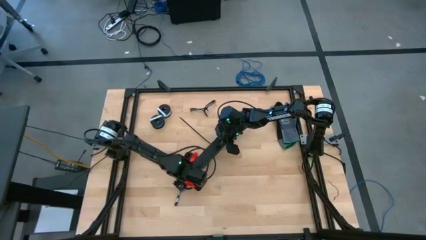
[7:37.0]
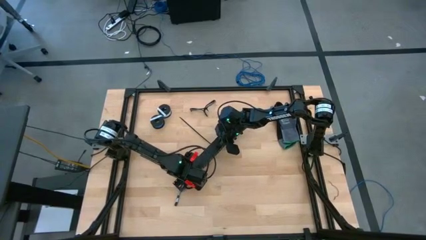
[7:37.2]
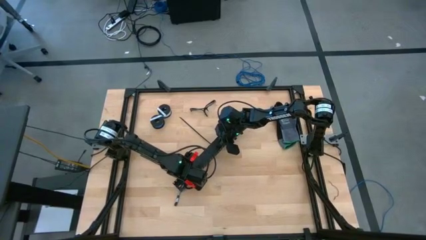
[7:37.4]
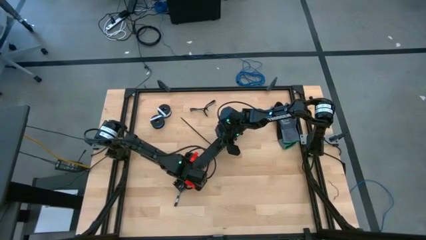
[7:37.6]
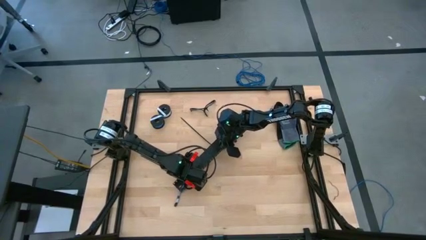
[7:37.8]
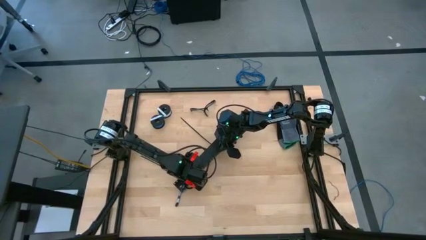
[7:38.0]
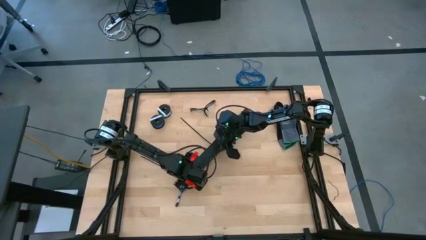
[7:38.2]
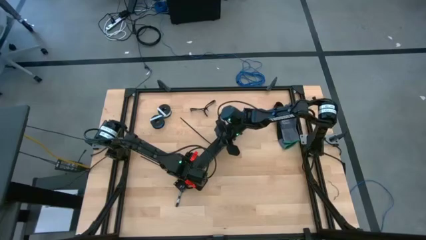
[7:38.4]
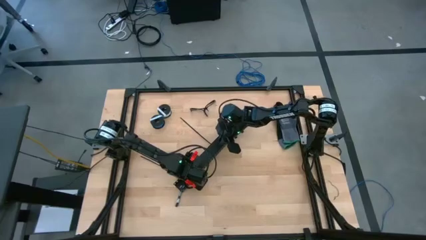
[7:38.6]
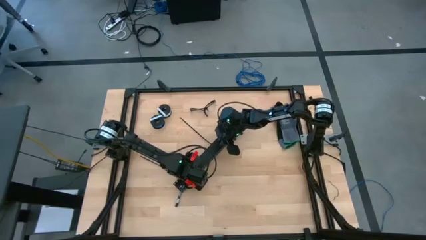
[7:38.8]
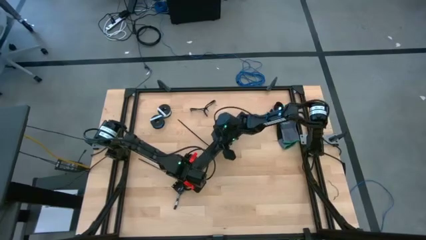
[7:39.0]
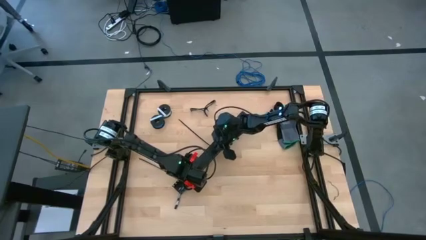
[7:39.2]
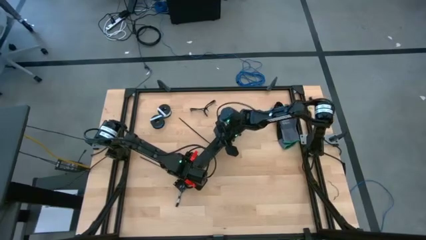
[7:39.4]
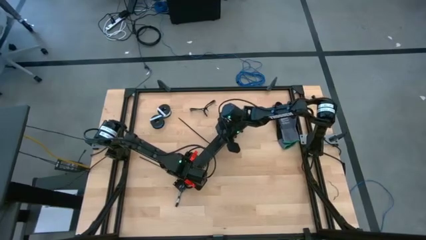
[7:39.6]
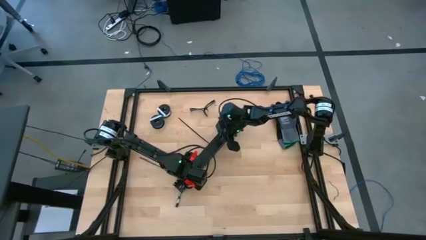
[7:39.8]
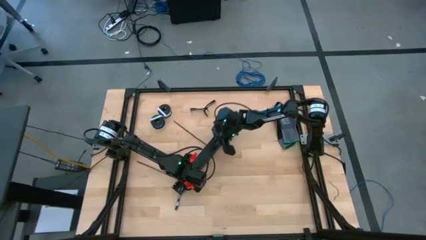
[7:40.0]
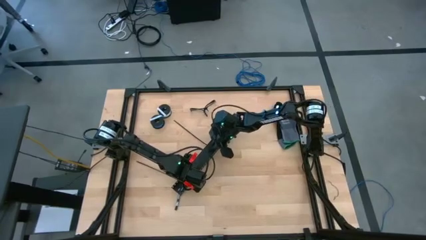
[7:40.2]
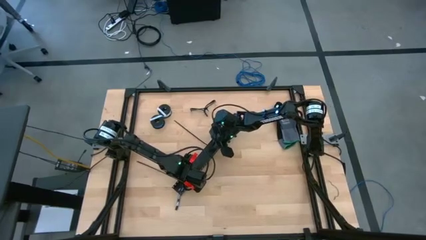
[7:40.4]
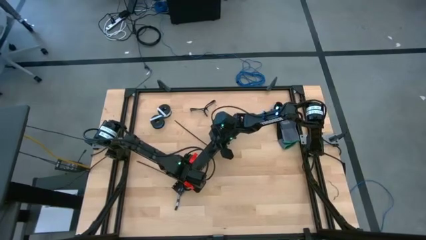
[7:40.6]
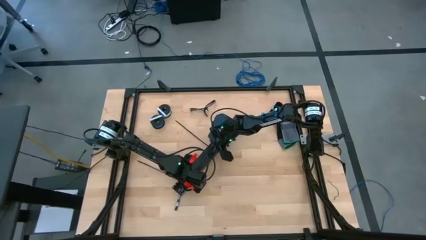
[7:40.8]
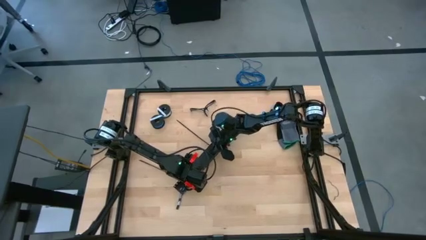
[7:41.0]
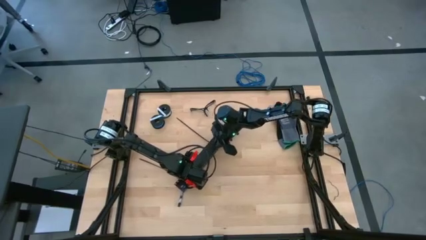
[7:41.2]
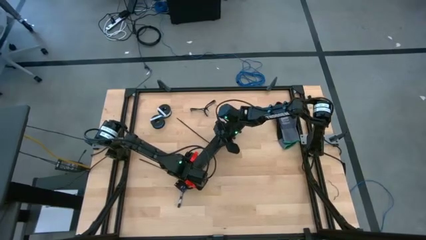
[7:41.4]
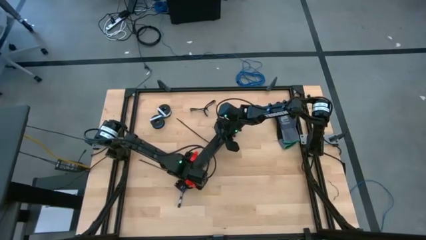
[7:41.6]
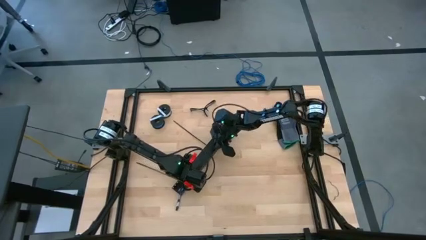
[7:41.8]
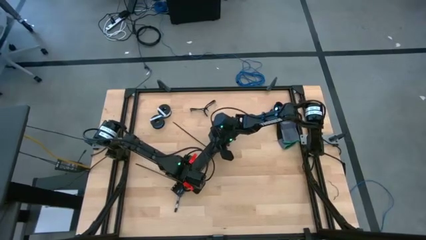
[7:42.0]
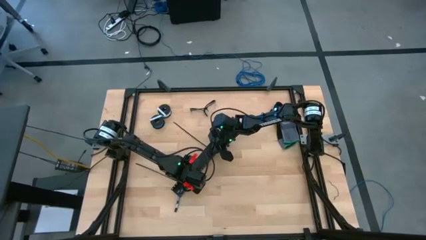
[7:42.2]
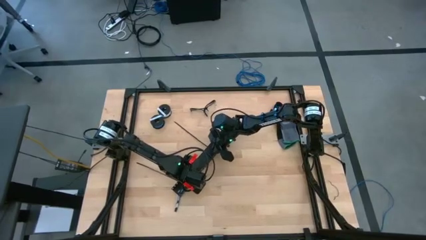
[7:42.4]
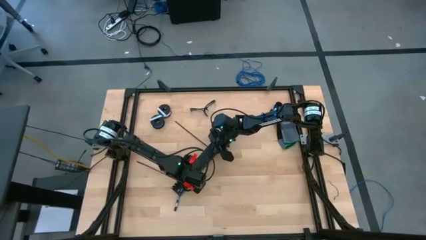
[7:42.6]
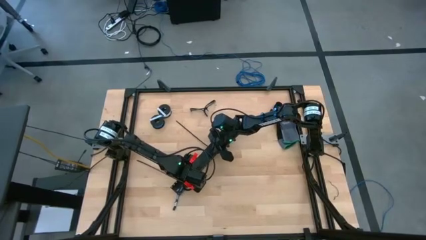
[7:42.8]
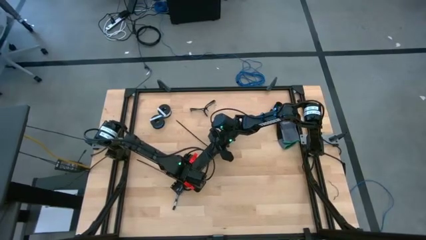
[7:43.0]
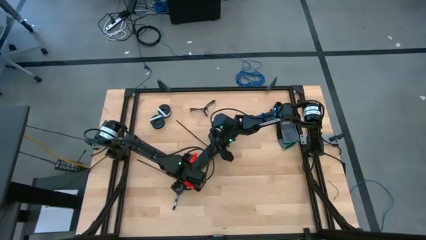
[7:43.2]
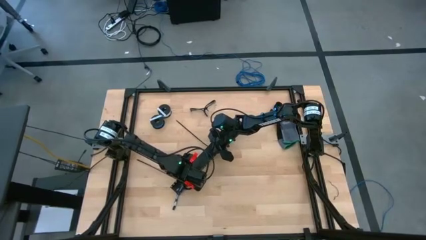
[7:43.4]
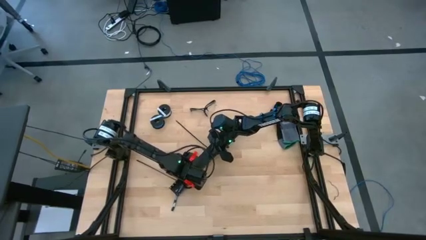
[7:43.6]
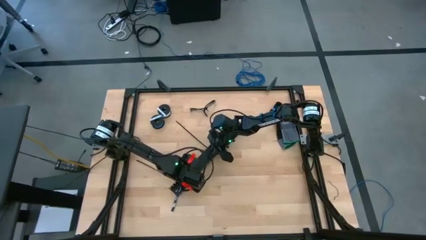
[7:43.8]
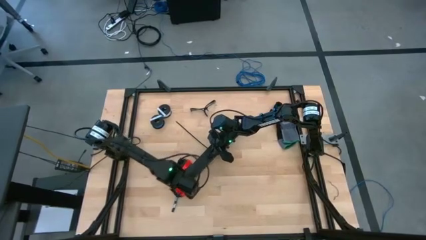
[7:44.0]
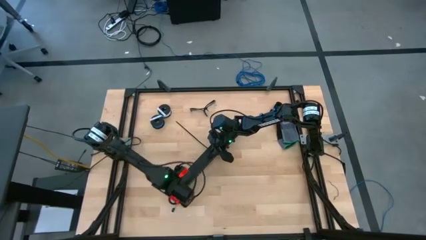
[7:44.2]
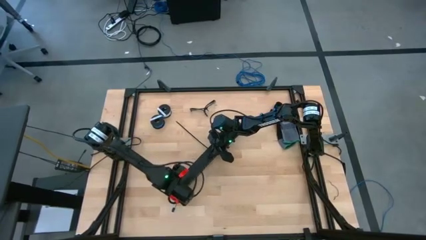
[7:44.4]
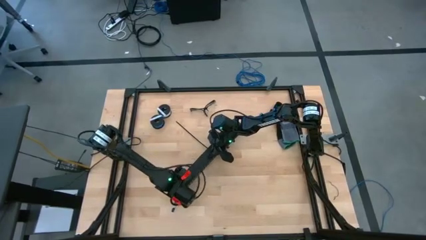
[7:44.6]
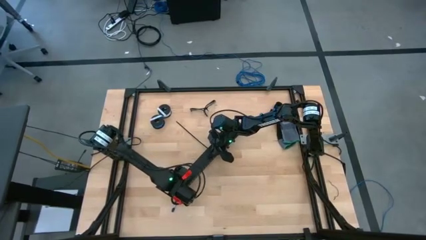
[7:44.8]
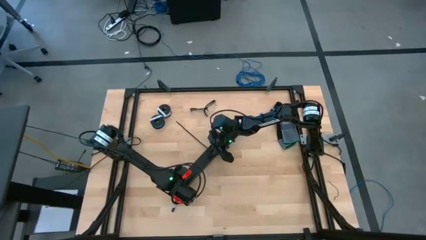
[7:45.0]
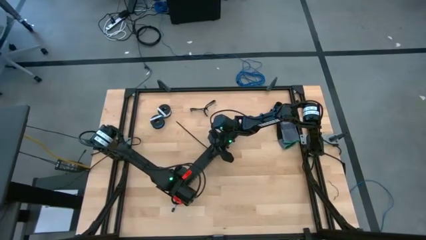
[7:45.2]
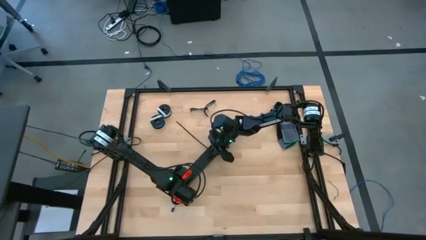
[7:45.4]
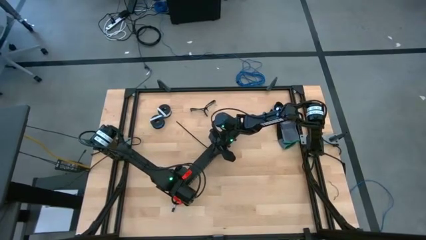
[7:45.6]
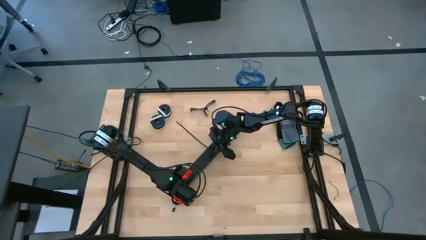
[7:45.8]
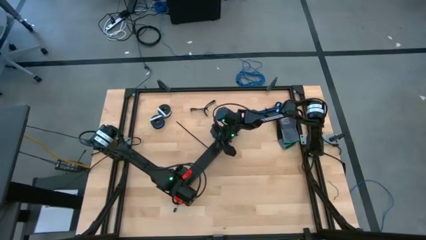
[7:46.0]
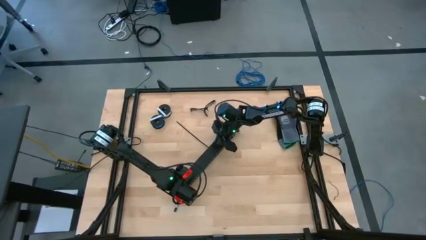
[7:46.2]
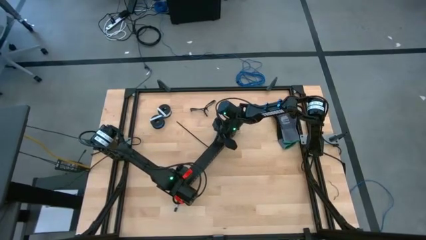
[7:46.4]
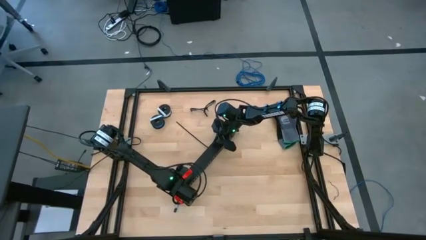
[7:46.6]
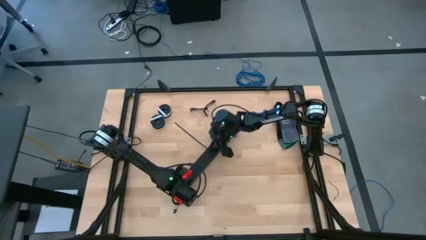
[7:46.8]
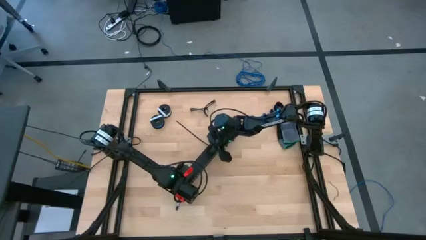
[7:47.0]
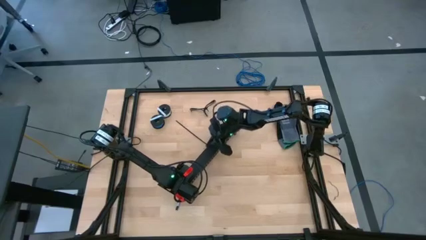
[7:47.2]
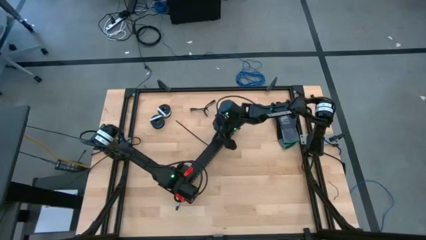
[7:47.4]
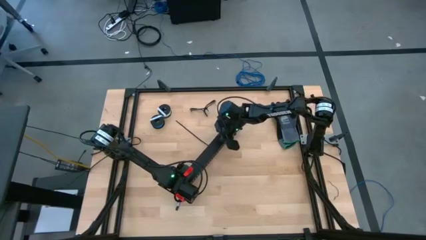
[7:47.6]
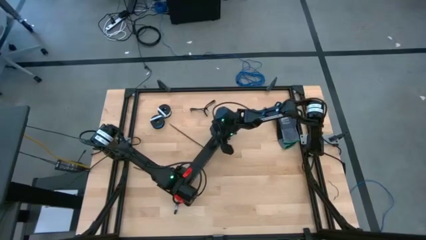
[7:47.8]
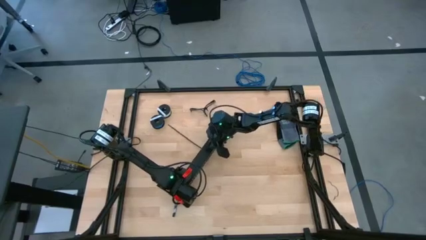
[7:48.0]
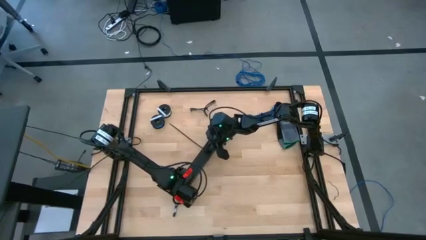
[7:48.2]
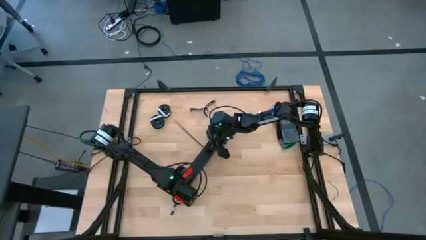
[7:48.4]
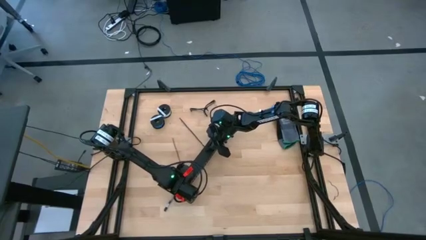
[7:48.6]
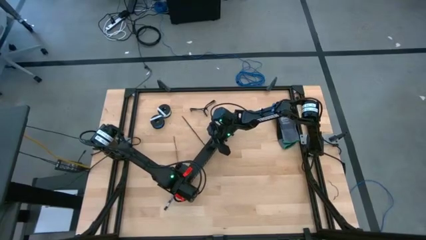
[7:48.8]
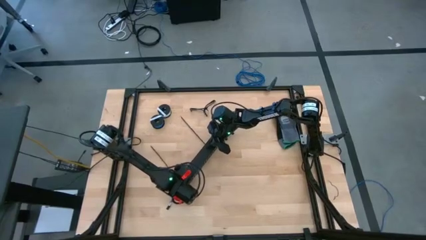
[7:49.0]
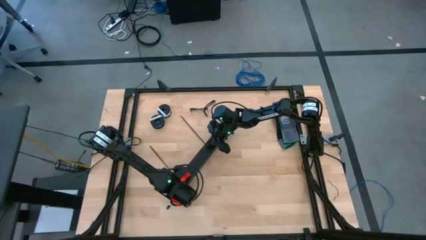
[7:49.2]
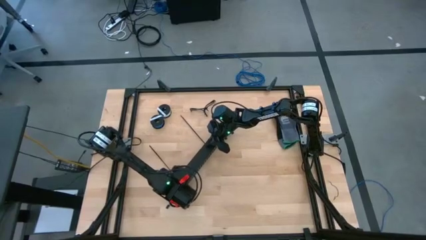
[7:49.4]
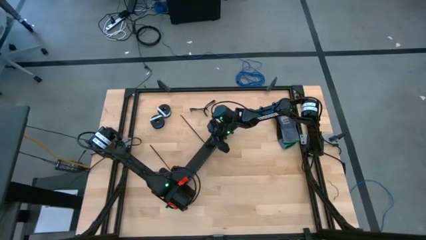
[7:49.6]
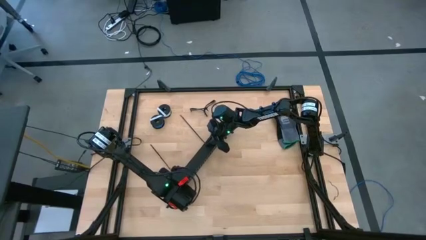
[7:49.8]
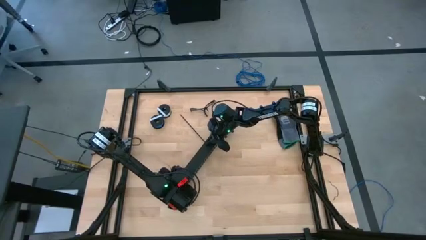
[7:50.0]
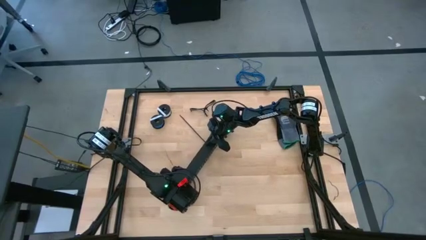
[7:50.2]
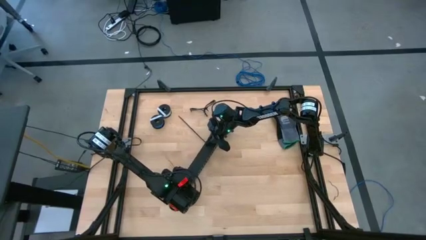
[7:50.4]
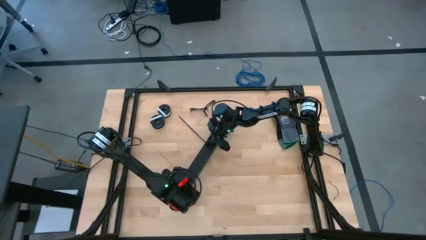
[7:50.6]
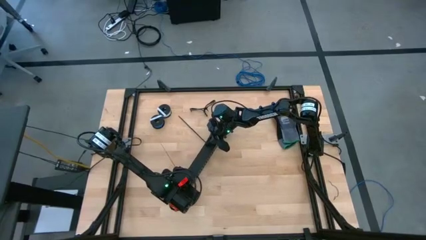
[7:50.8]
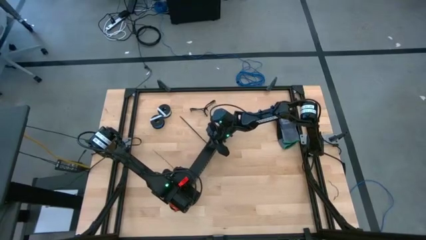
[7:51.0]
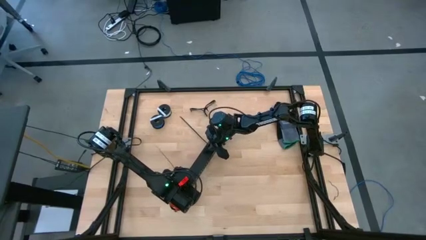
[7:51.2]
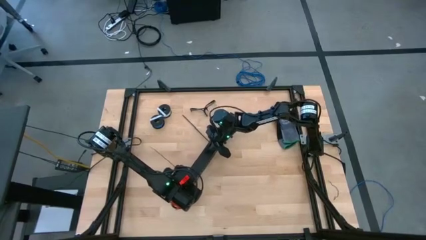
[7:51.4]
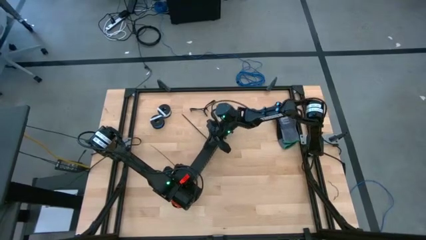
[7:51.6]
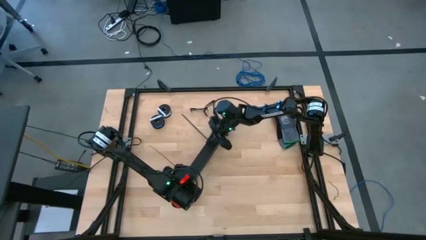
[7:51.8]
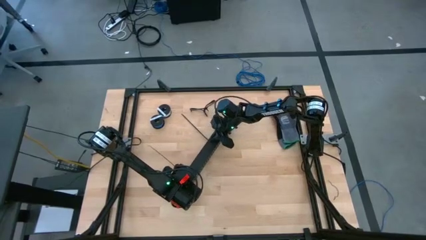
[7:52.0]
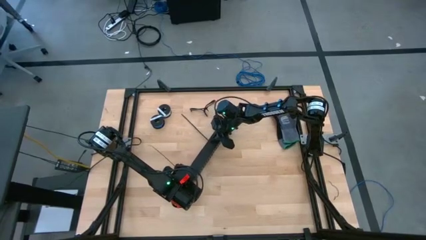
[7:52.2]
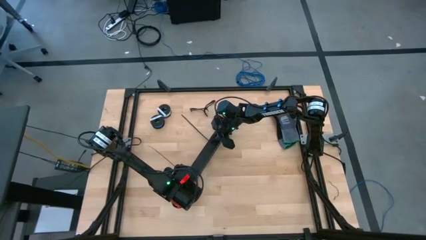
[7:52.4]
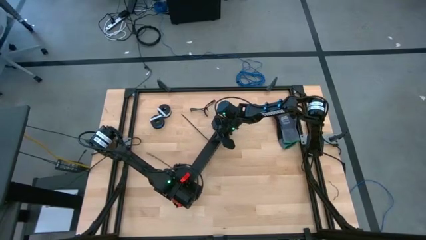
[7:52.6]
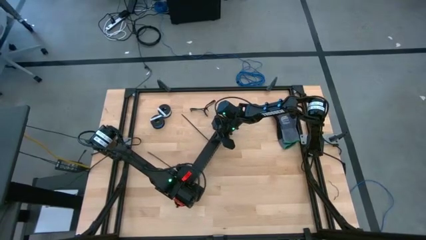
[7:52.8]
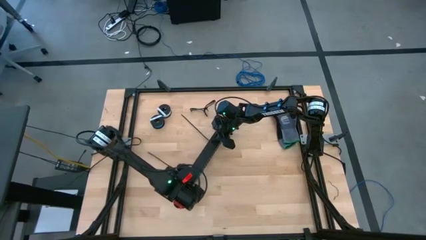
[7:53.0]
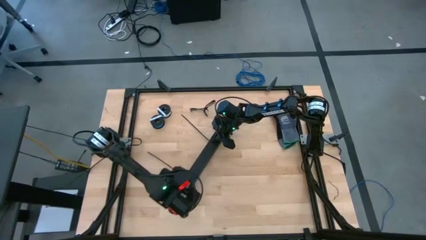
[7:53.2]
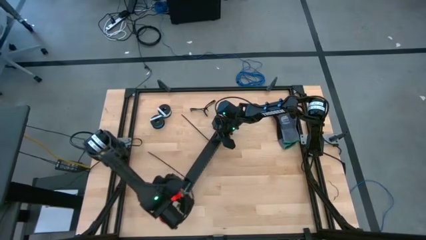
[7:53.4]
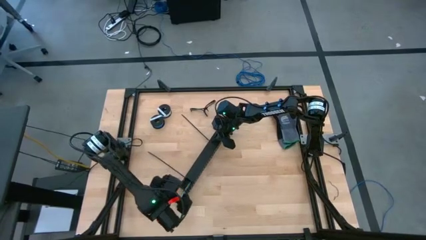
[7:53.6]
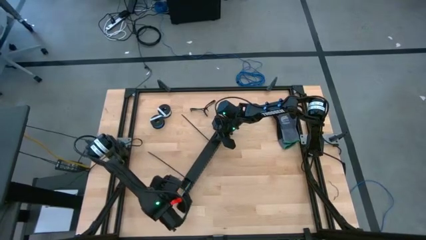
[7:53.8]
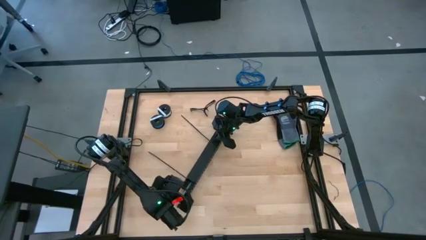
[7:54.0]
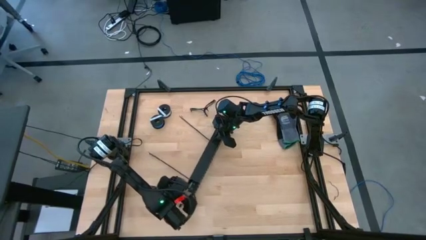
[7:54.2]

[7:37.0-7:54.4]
Task: Ziptie cables
Insert the black cover of the black cable duct
